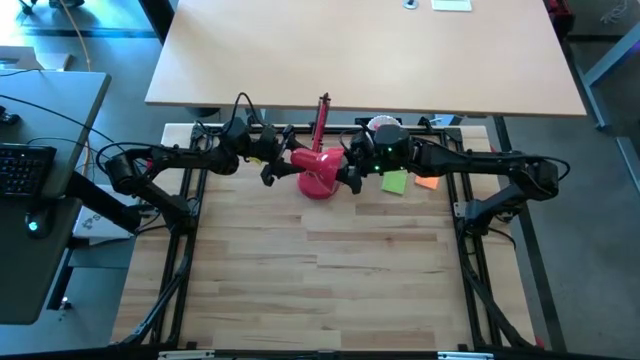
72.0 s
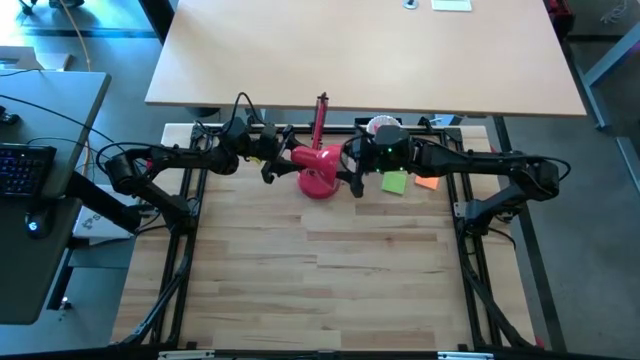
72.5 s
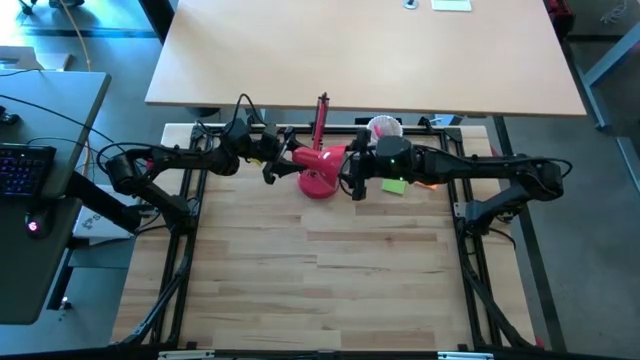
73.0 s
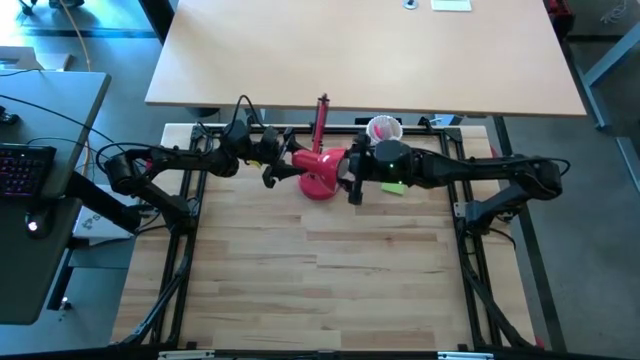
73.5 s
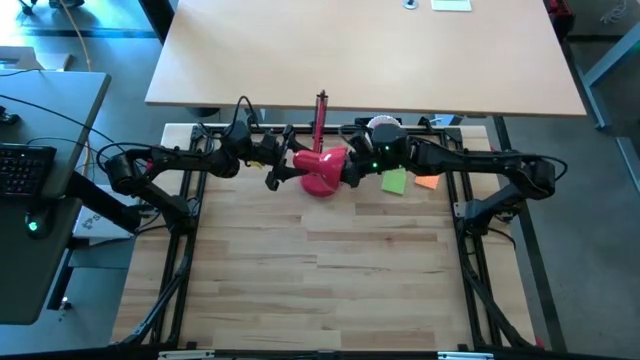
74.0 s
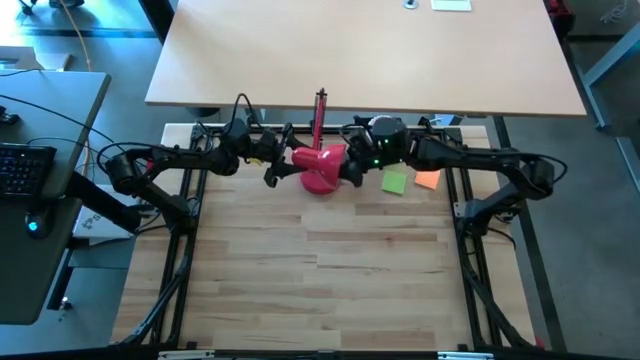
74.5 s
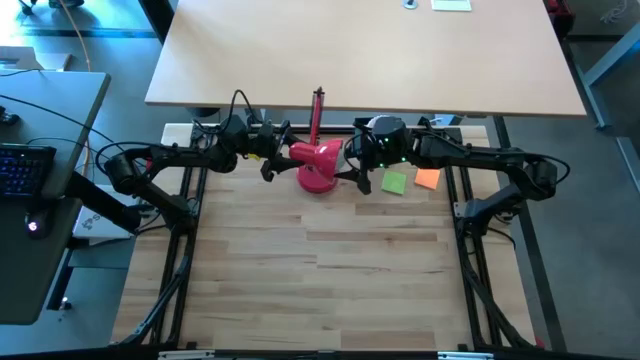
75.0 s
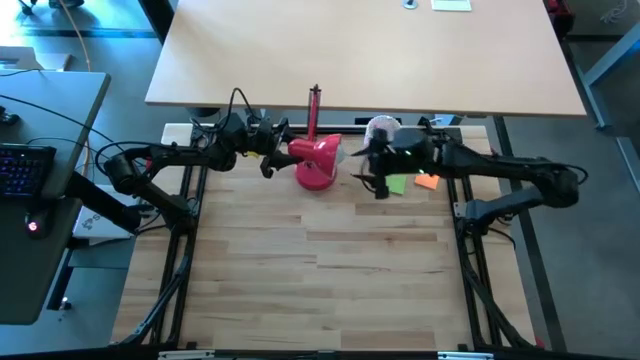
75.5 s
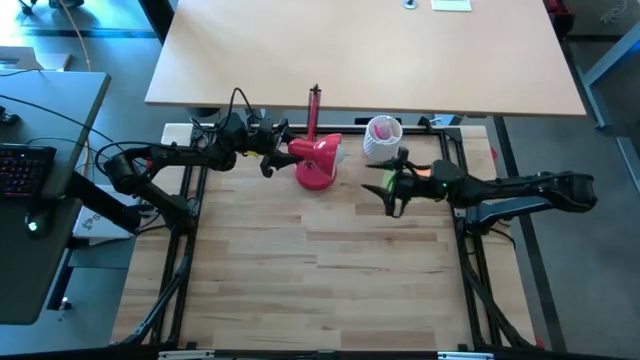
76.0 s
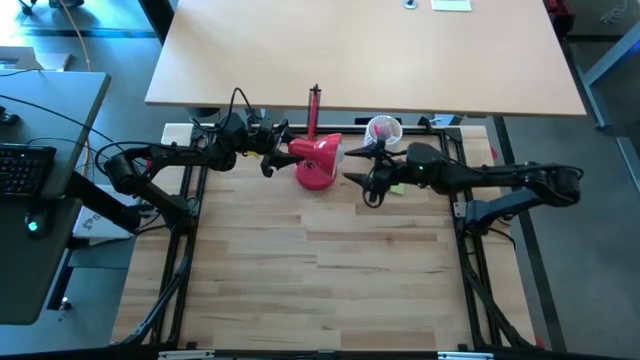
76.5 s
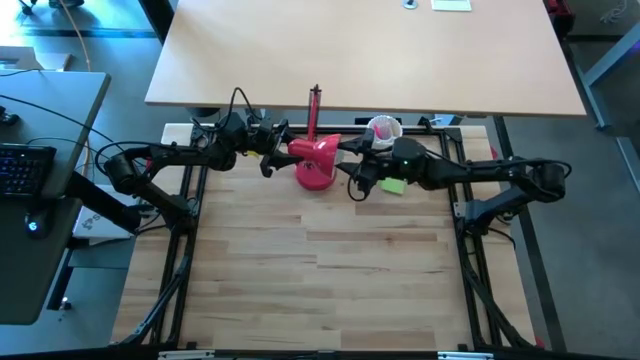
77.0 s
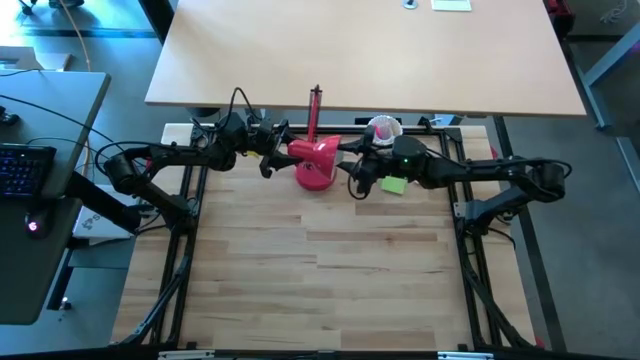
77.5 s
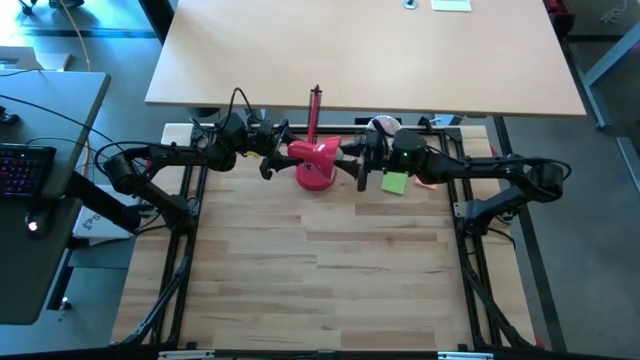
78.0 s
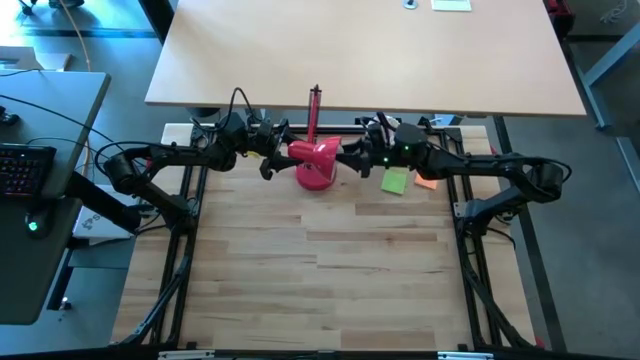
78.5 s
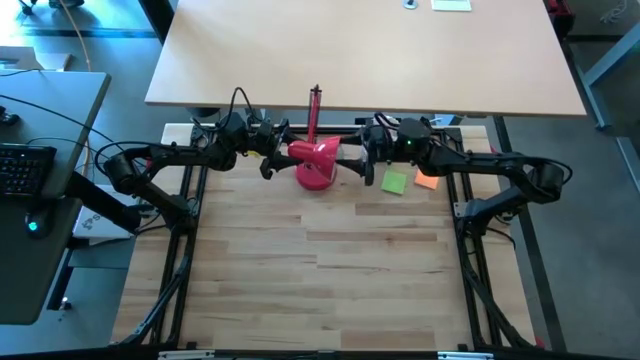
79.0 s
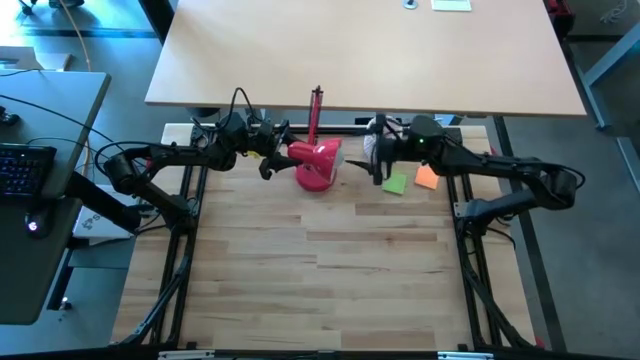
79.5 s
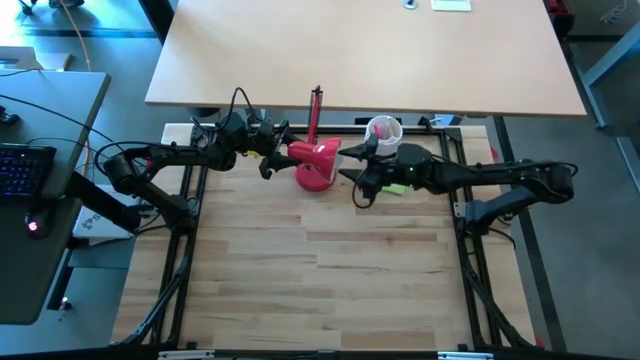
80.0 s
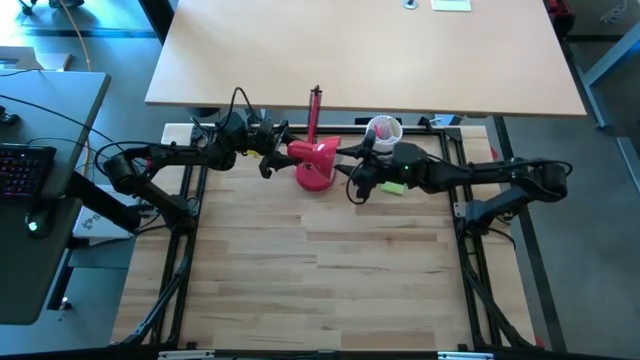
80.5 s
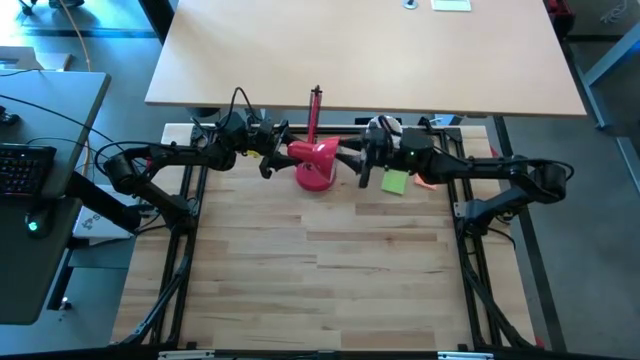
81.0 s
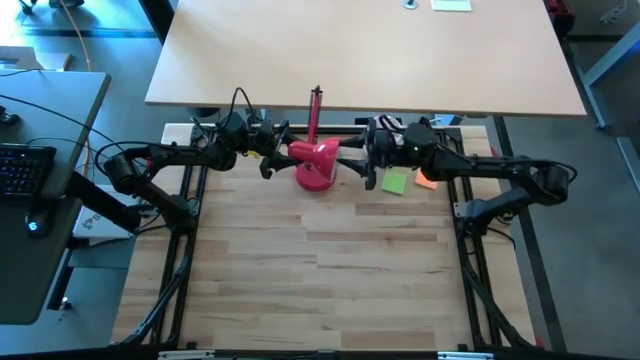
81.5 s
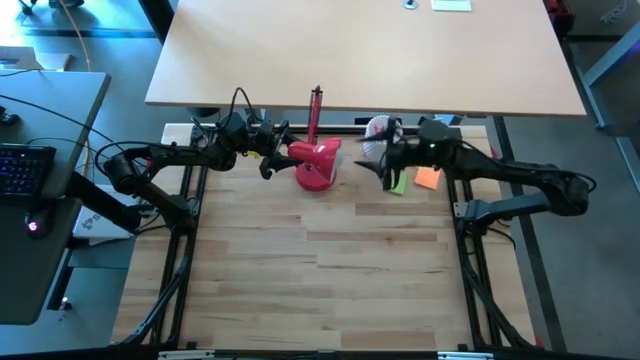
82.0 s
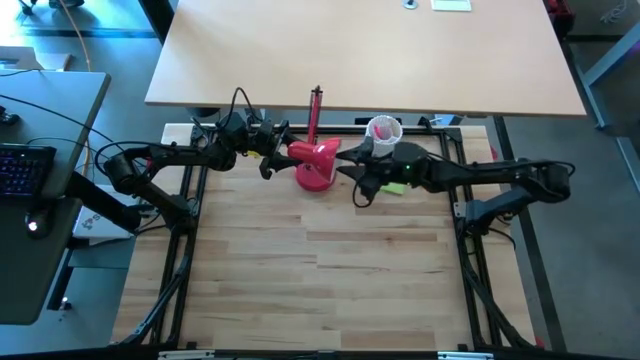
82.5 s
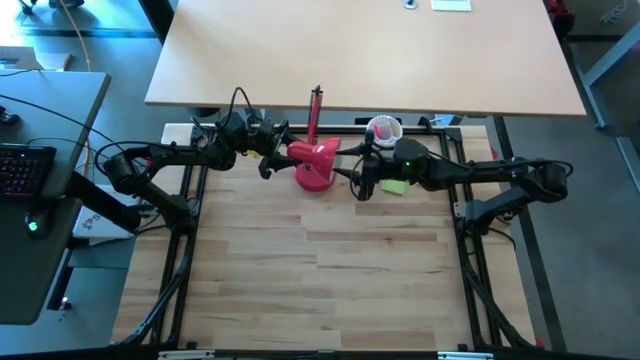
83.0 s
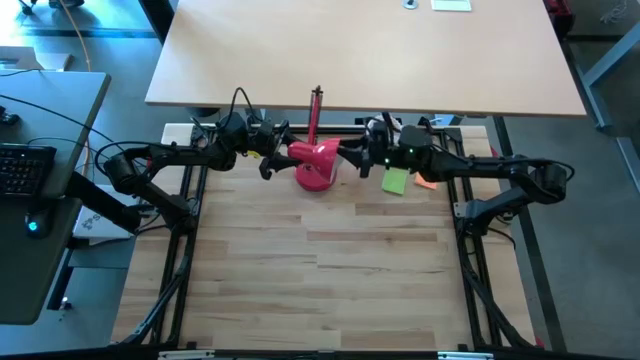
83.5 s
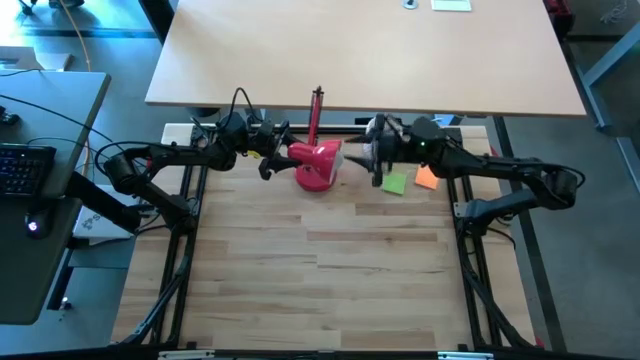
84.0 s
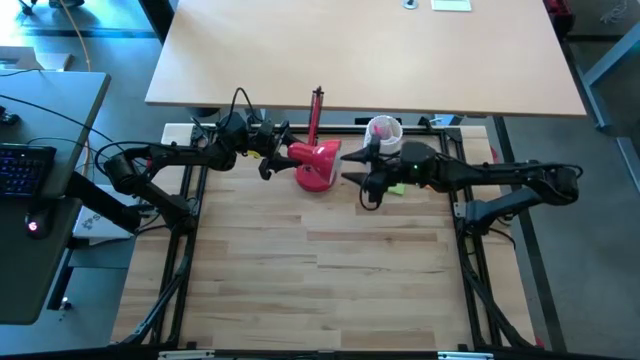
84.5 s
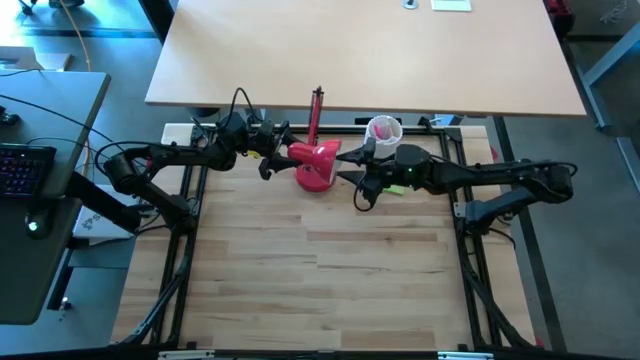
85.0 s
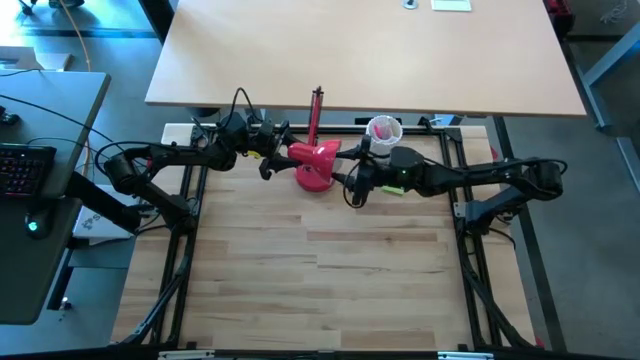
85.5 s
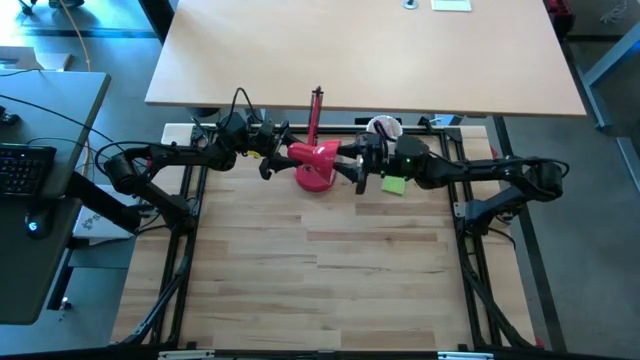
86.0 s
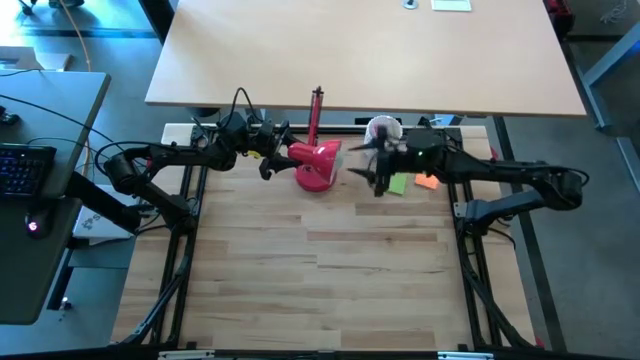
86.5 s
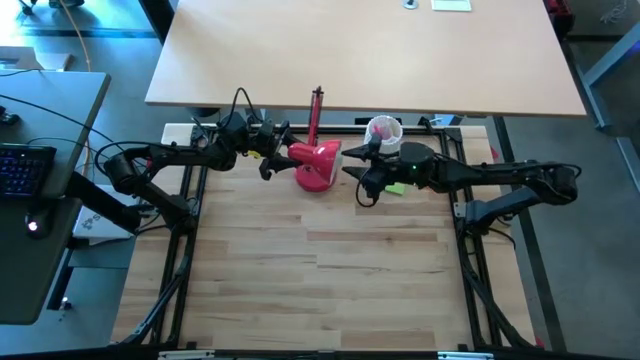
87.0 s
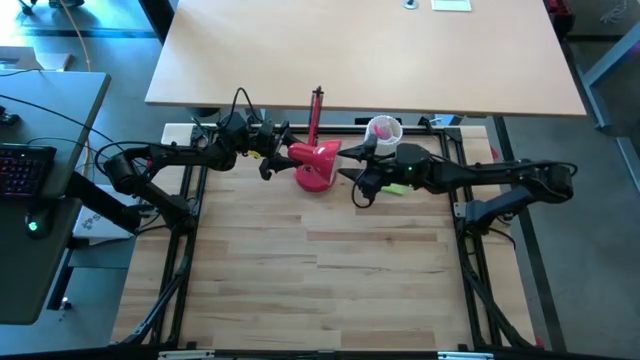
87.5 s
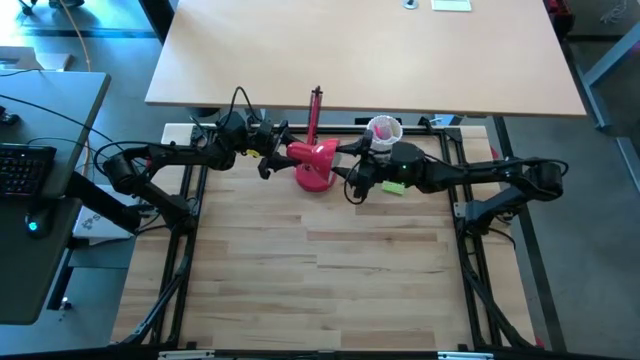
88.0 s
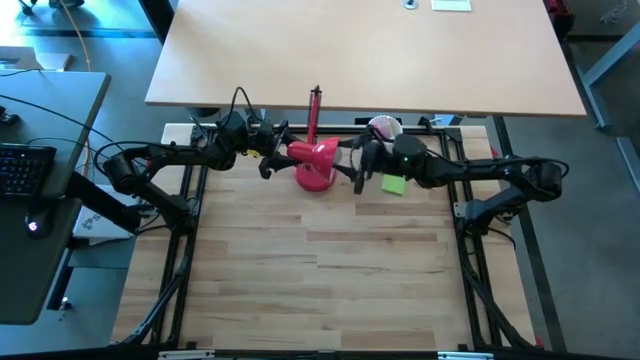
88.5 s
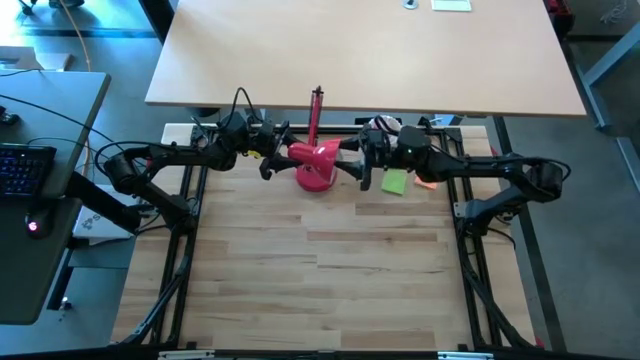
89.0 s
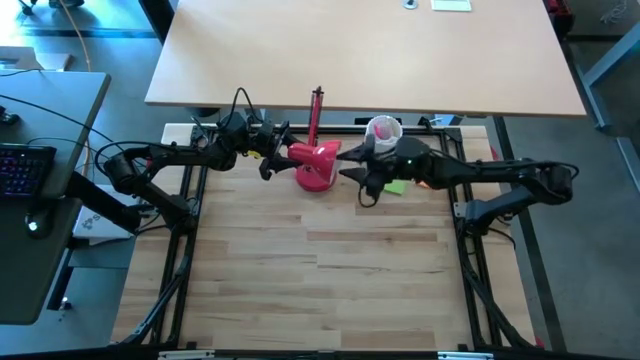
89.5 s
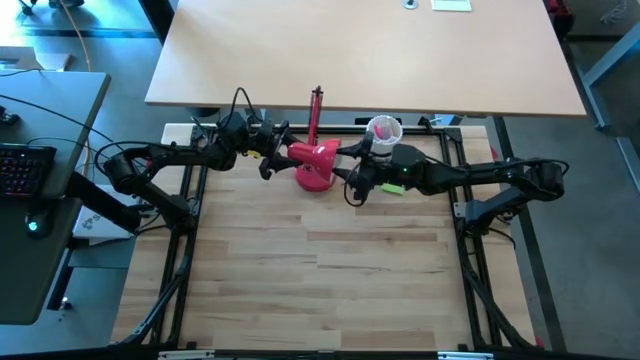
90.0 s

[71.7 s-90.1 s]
Task: Screw lightbulb
Insert the lightbulb into the red lamp

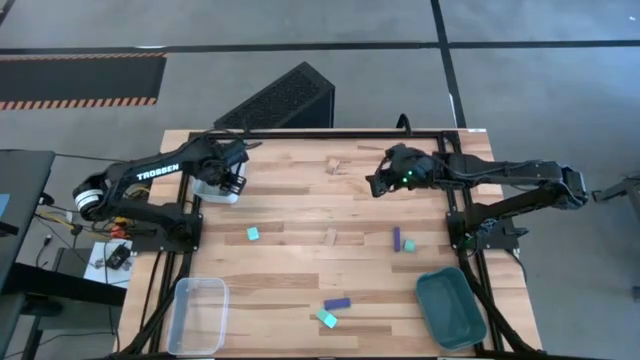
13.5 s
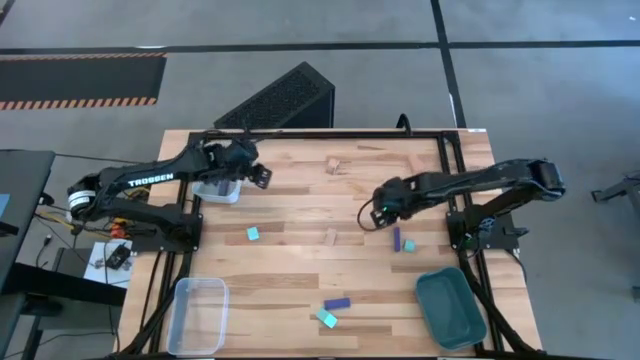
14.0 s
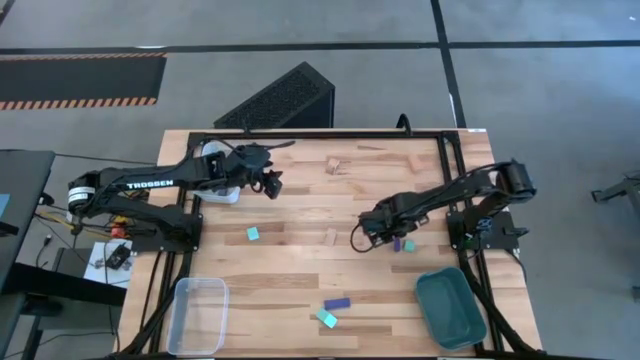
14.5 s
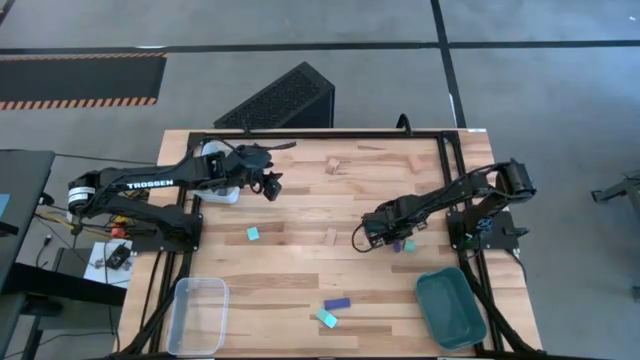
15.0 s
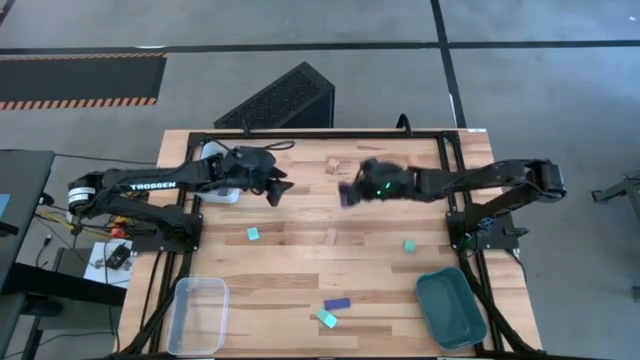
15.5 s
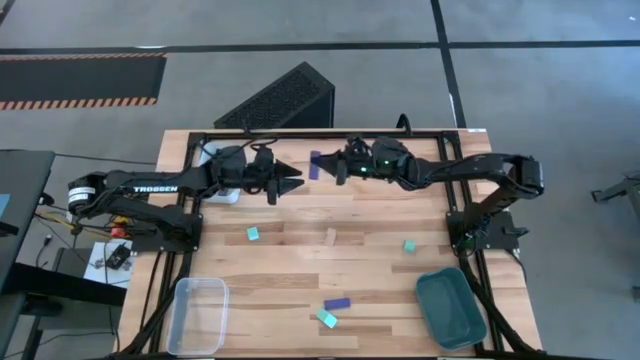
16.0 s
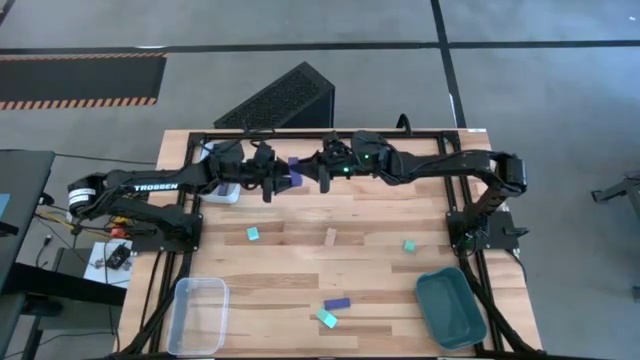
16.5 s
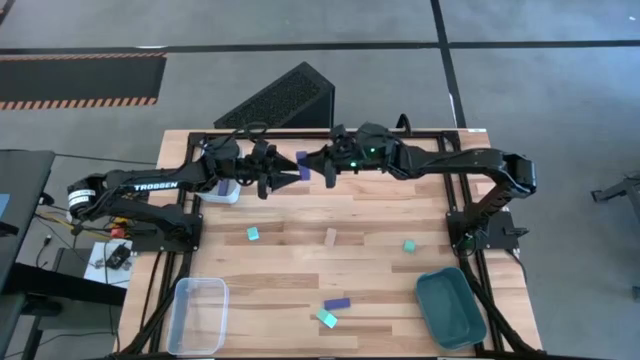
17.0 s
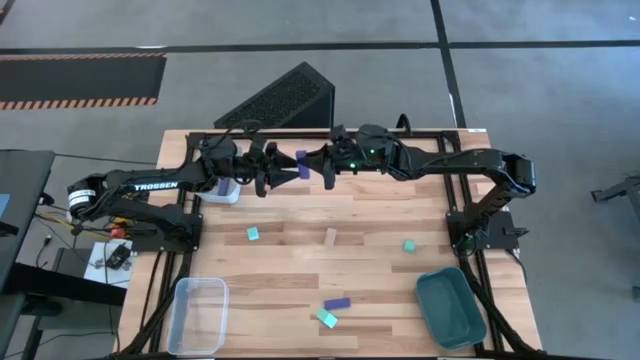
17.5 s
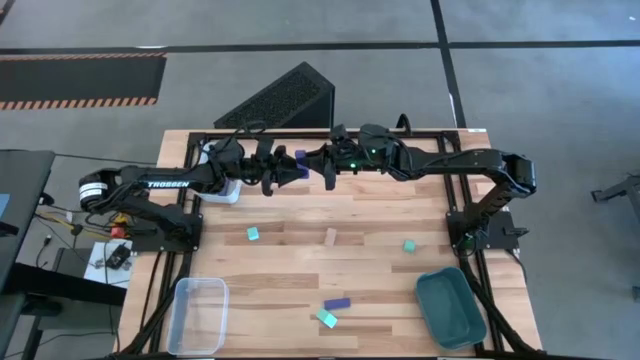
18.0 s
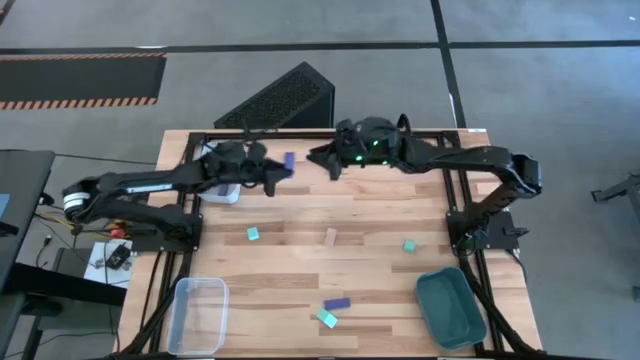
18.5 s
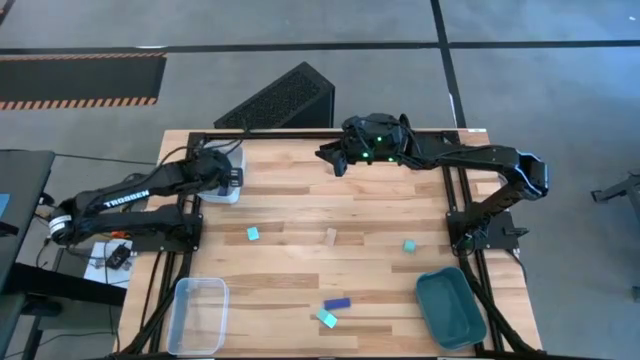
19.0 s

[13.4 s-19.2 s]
Task: Sort & place blocks by color
Put the top violet block into the white bin
